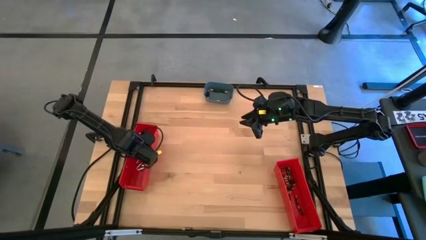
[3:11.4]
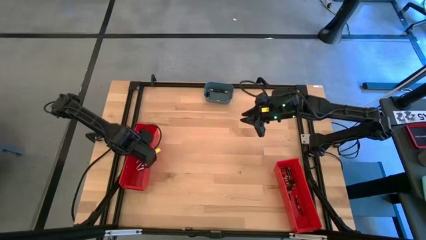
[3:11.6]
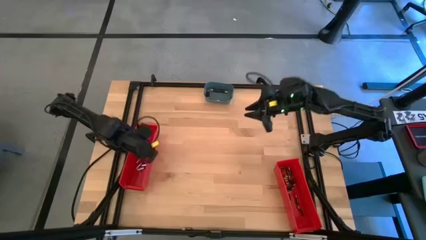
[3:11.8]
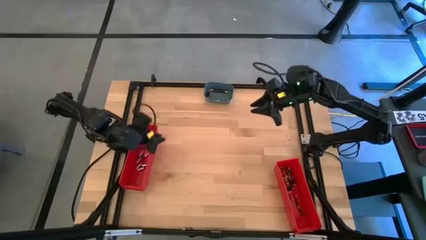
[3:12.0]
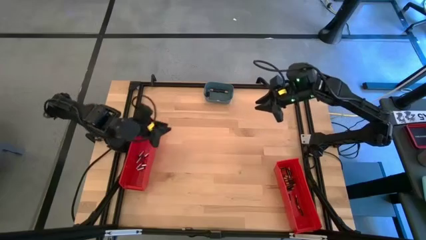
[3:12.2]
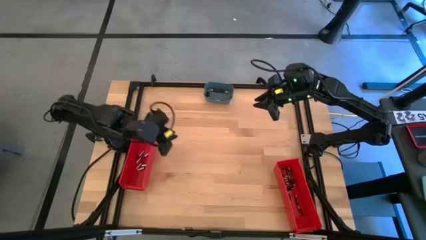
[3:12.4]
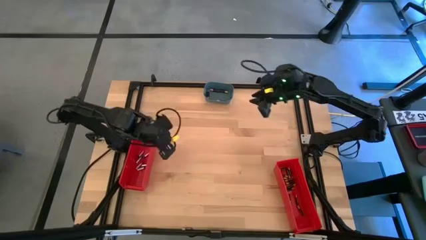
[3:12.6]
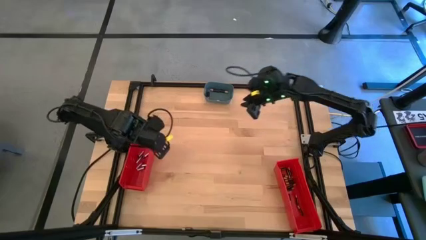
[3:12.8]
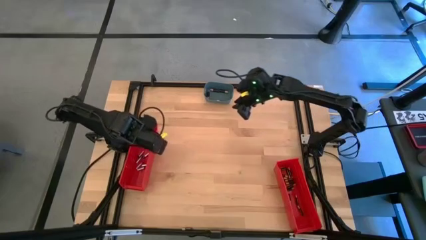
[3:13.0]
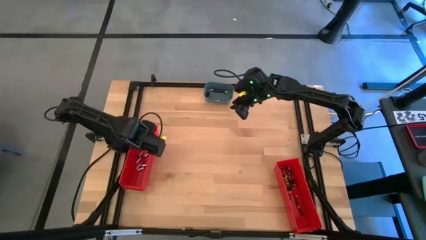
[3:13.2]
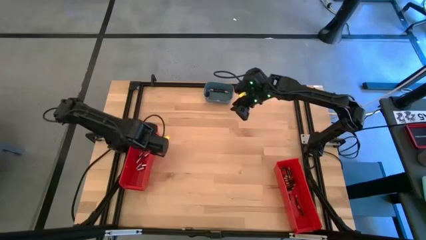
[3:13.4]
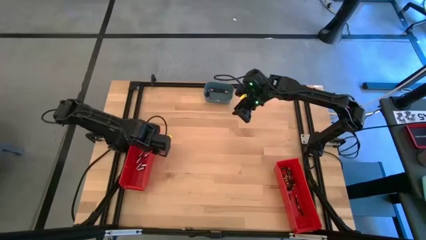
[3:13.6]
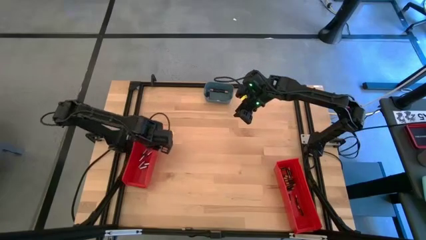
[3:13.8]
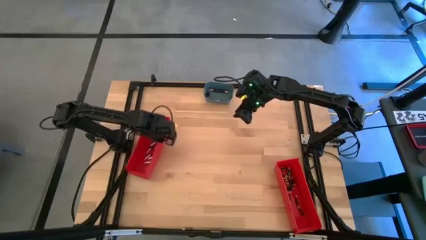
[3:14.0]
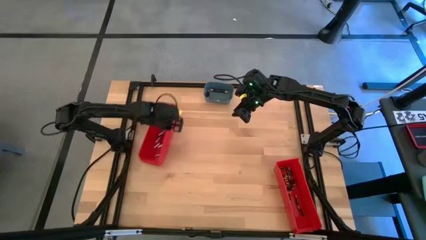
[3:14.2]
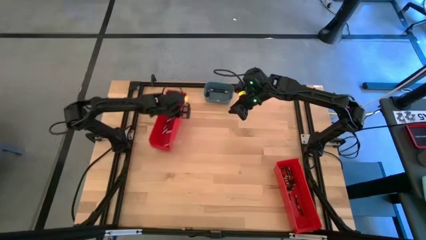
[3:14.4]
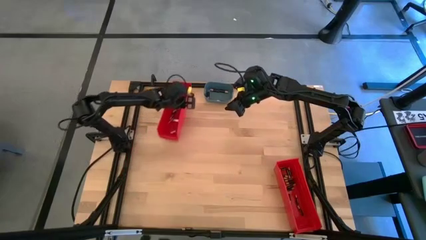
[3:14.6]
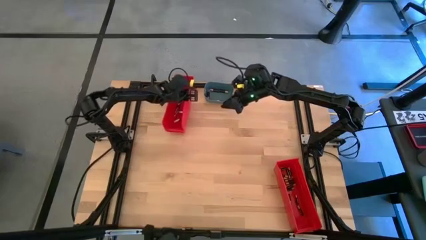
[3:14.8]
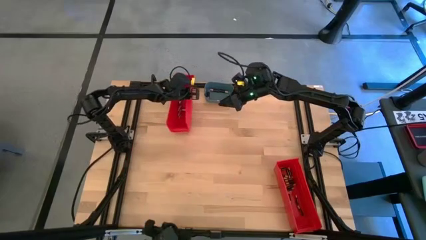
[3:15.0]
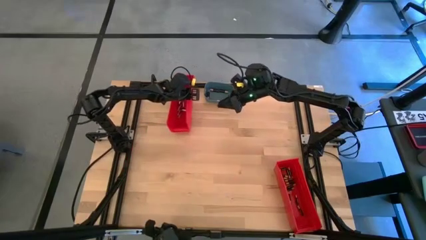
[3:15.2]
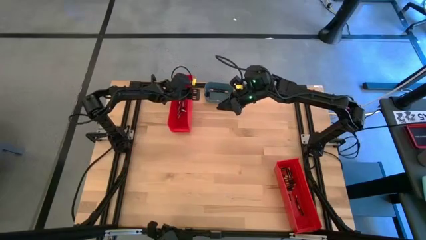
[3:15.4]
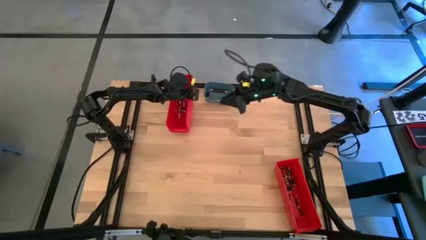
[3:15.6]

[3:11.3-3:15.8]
Task: Sort batteries
Move the left red bin to the left side of the blue bin

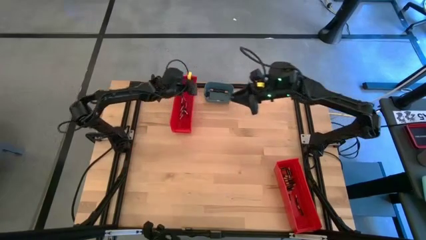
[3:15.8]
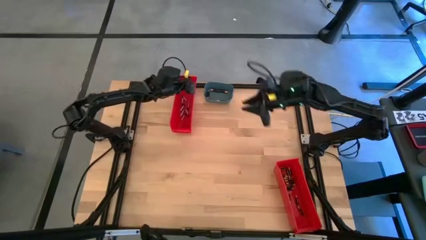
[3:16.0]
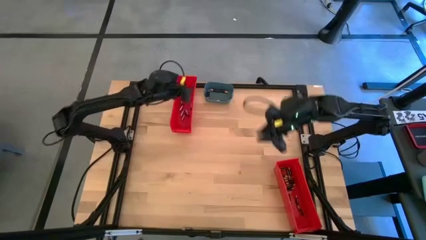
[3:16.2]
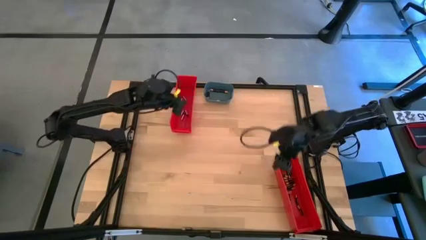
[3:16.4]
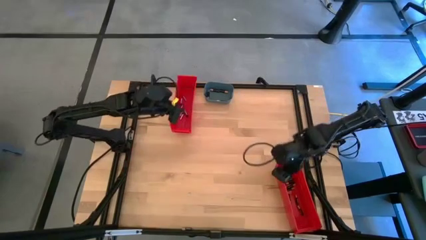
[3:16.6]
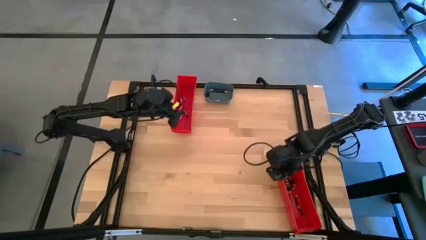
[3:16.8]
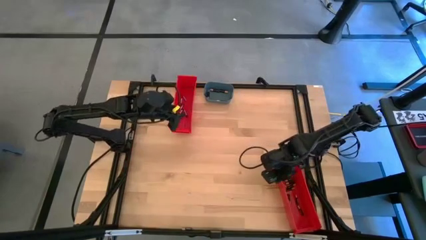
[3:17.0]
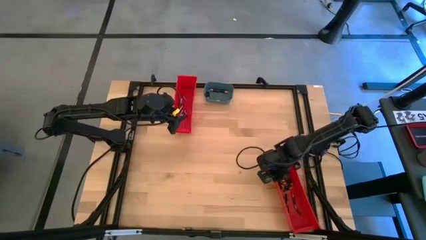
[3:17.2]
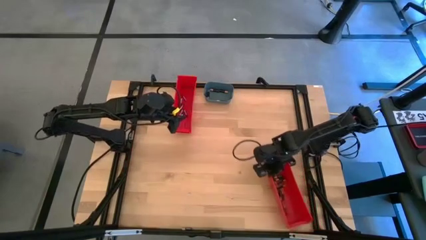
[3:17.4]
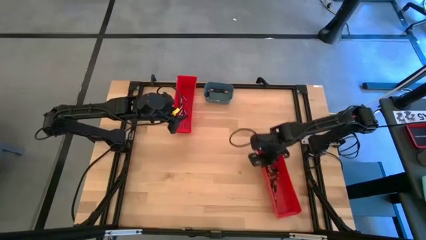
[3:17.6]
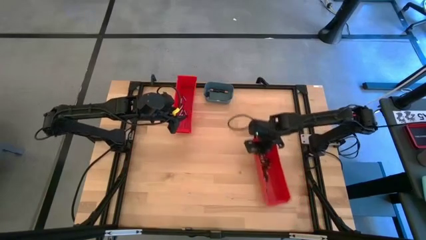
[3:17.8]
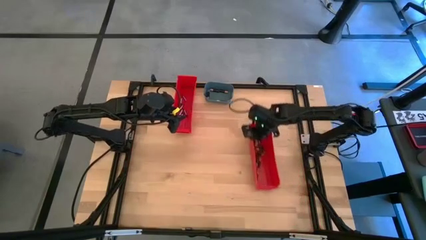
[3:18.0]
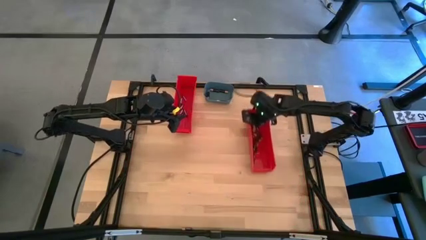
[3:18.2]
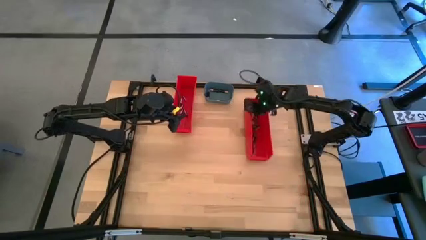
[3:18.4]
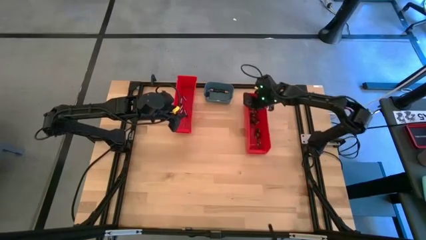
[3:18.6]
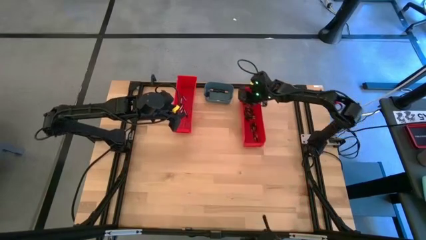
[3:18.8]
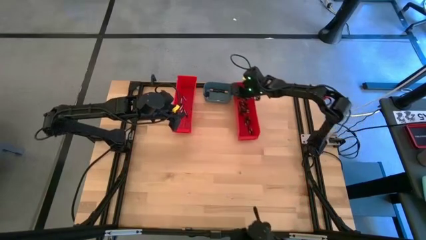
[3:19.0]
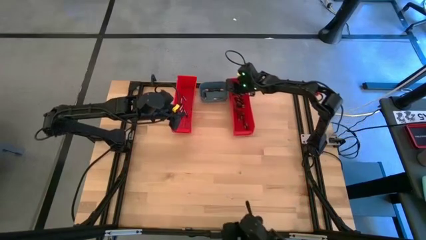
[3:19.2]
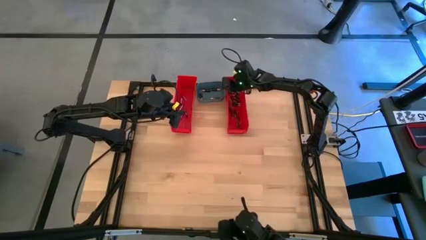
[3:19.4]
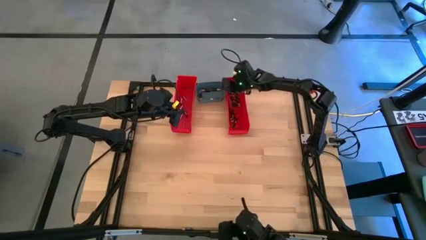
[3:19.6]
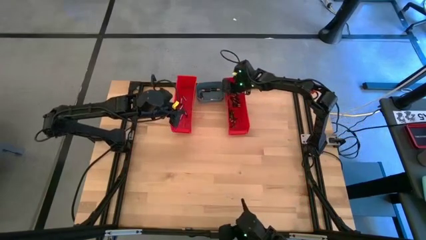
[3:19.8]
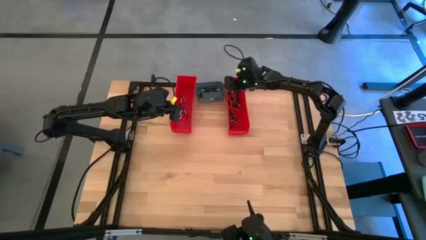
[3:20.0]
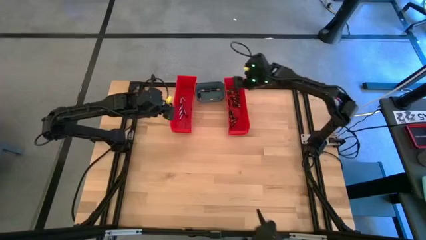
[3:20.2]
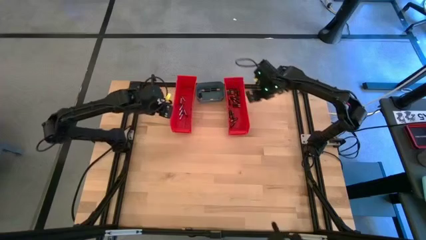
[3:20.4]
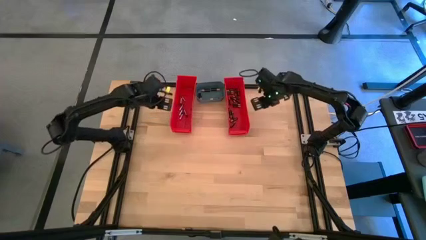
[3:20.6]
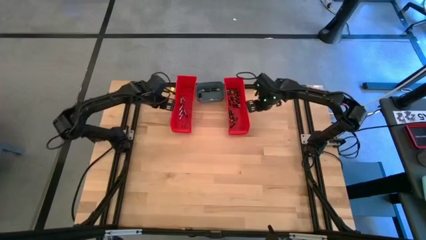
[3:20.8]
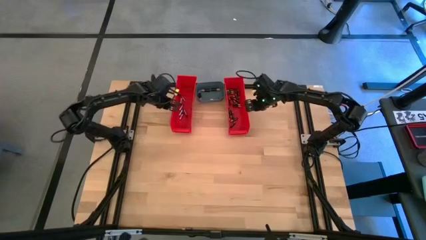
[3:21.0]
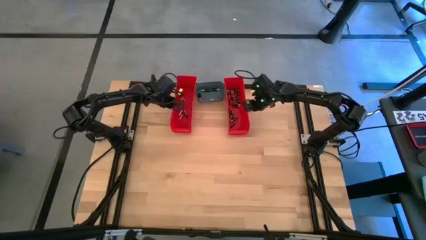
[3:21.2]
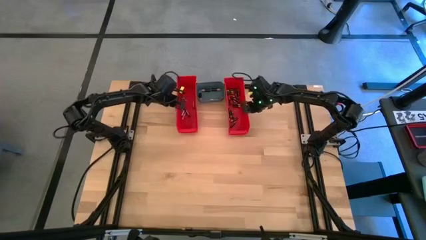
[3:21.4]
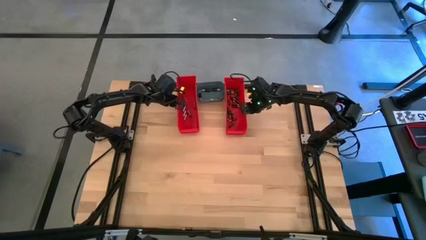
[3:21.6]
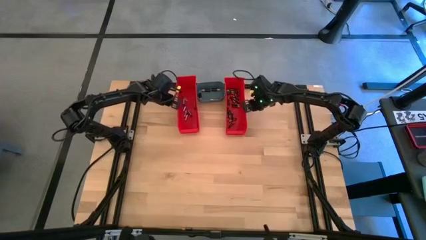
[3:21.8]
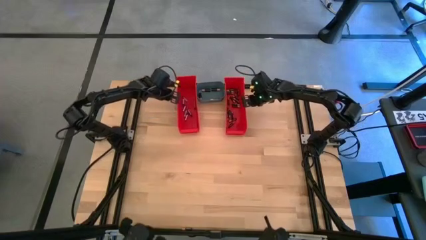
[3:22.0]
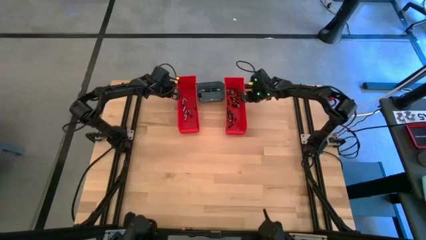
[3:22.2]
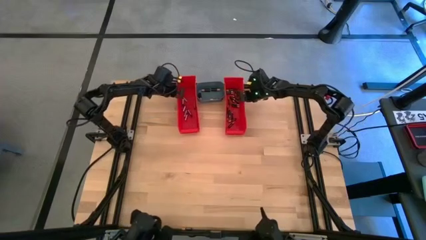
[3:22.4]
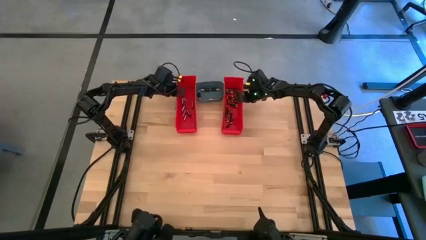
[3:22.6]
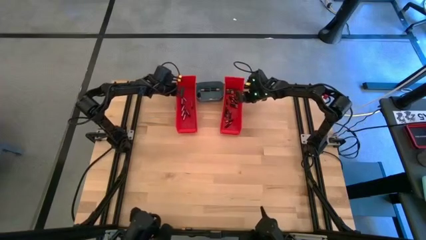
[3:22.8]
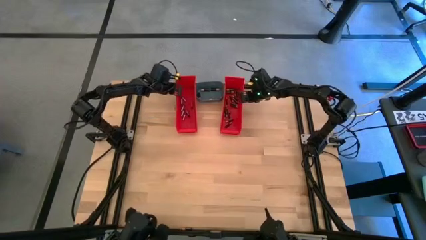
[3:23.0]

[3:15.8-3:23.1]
Move the right red bin to the right side of the blue bin

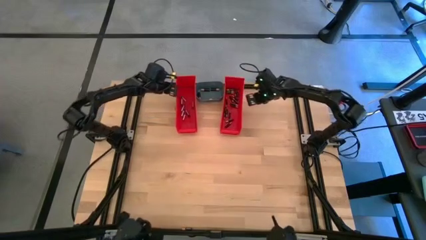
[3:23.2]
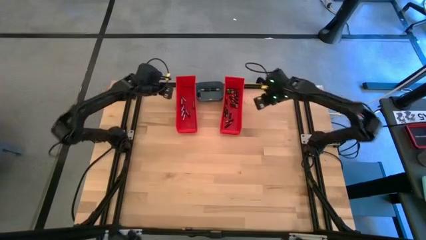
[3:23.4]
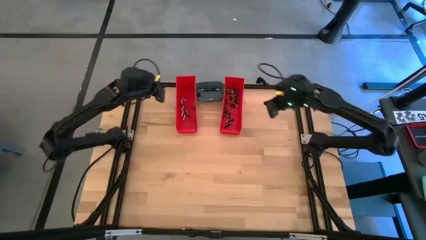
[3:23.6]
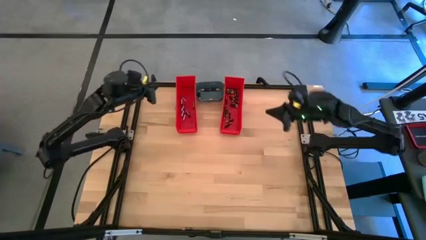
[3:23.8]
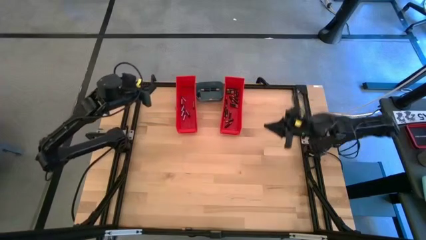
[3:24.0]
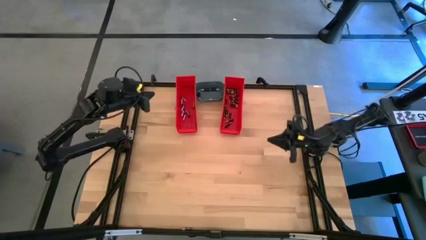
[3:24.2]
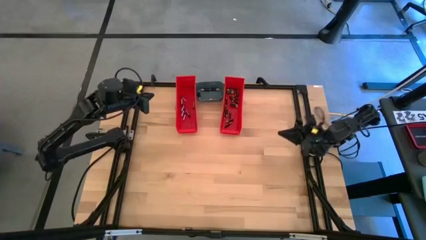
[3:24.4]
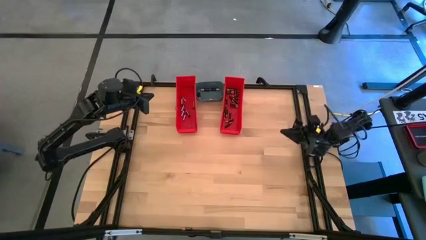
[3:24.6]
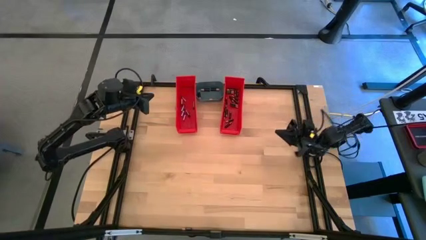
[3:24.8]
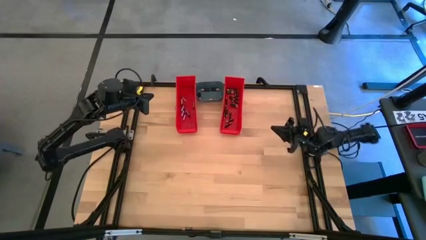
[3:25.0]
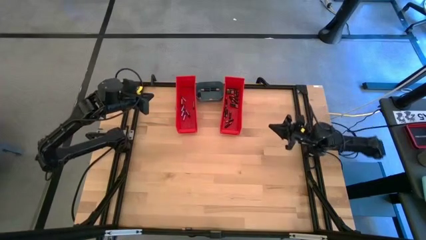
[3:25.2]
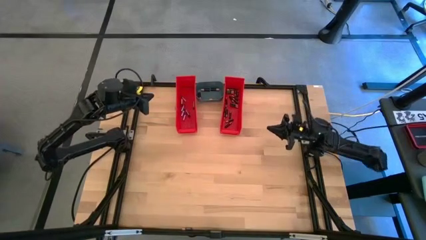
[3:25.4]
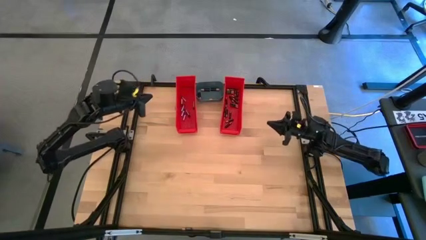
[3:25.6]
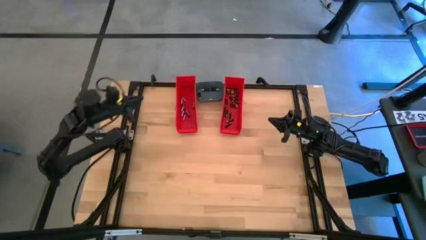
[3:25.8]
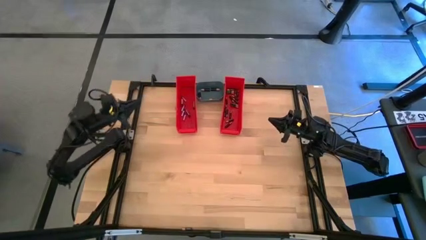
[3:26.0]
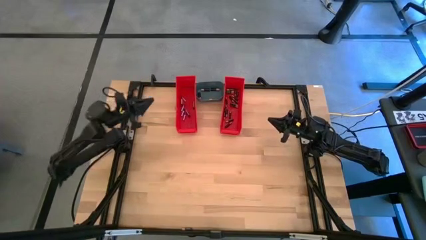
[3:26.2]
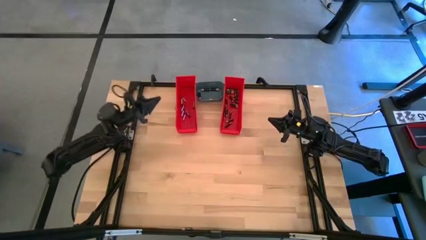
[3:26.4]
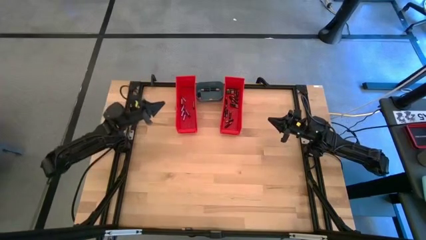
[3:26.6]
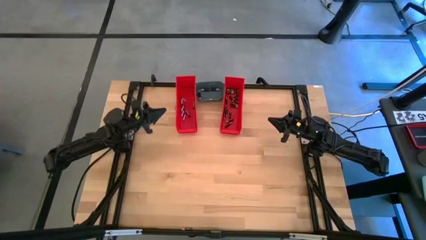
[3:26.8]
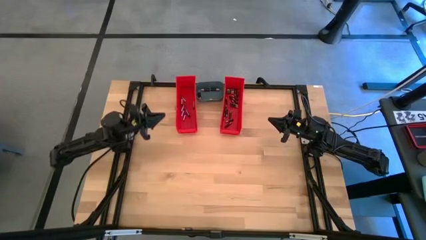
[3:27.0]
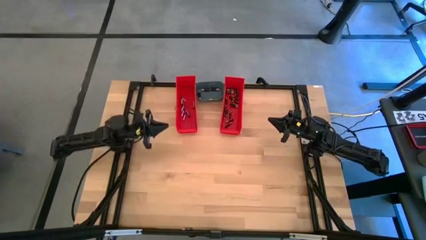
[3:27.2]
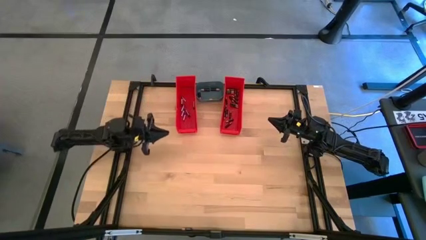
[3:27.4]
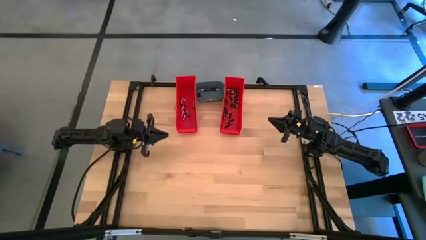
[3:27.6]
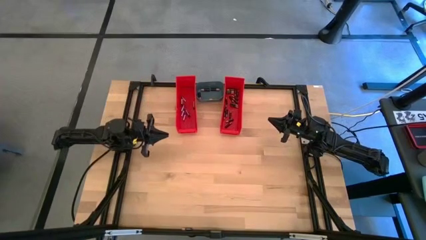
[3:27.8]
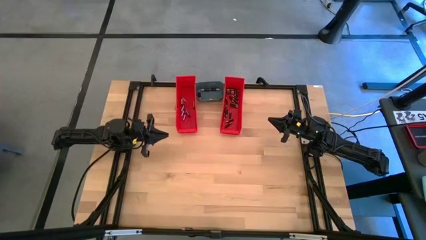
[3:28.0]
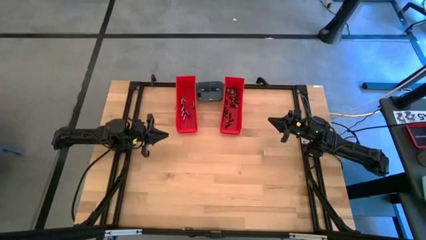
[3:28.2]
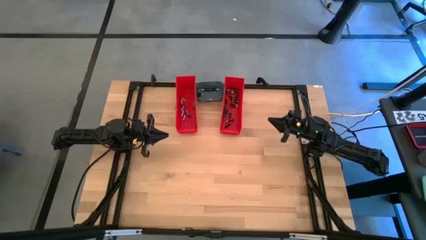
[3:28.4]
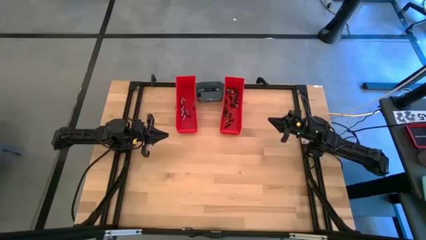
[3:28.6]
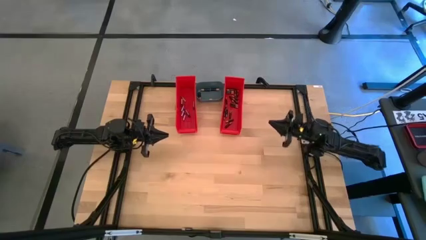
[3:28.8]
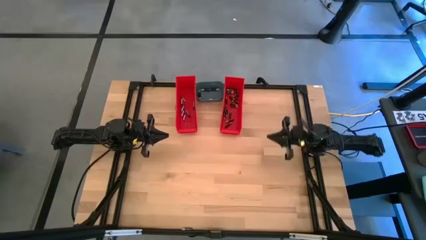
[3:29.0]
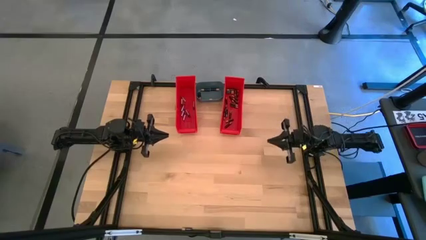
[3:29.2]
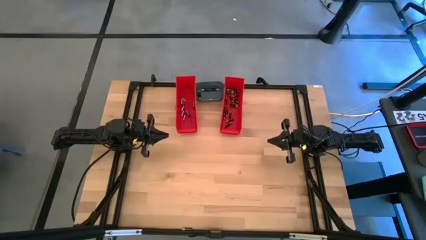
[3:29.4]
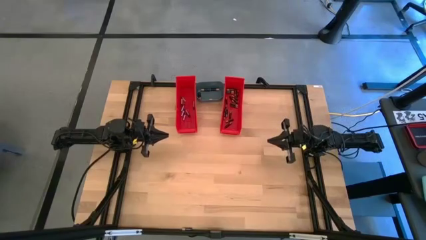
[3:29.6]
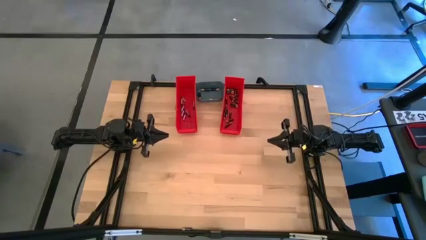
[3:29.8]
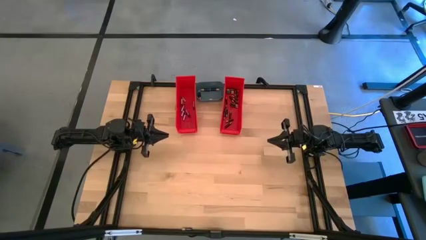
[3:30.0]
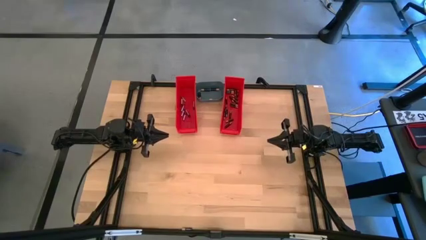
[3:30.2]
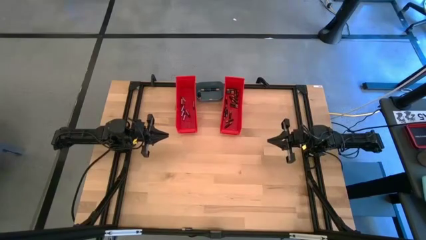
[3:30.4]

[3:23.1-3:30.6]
Return to Home Position
